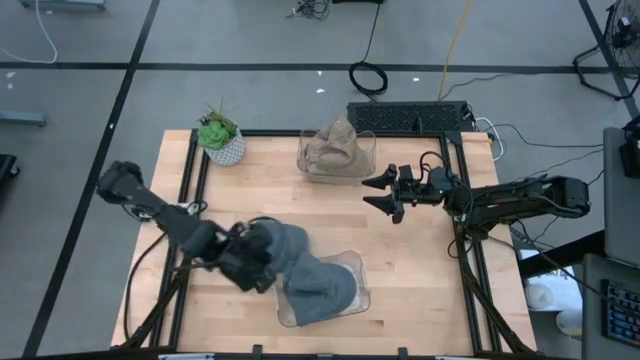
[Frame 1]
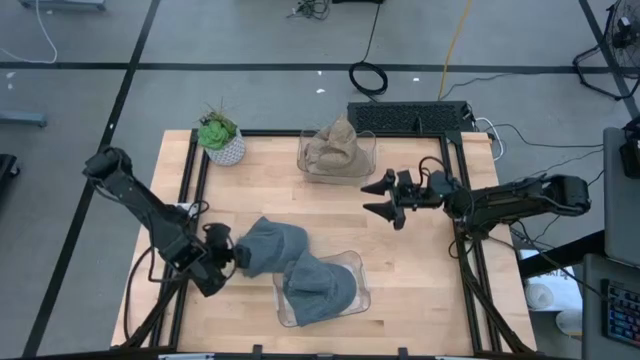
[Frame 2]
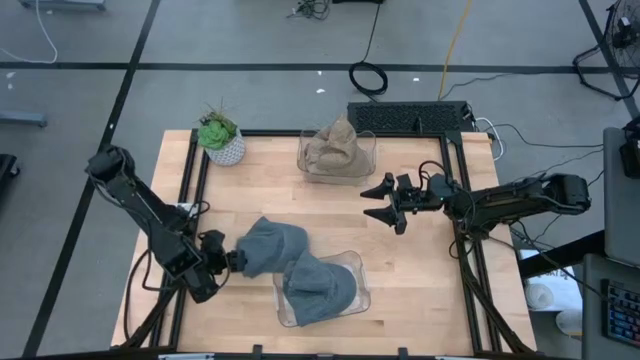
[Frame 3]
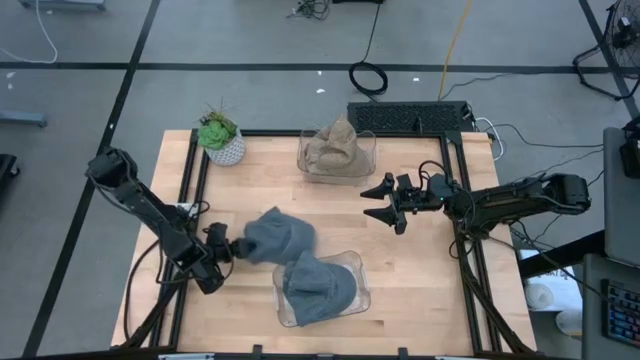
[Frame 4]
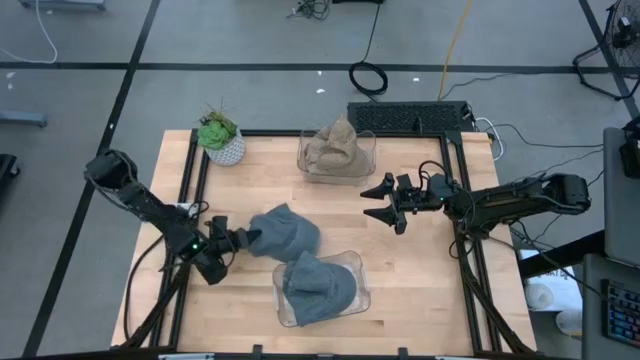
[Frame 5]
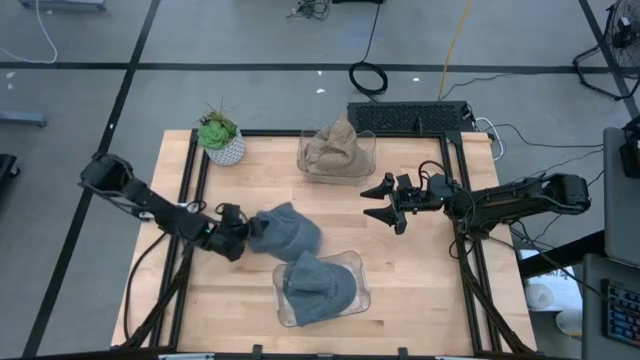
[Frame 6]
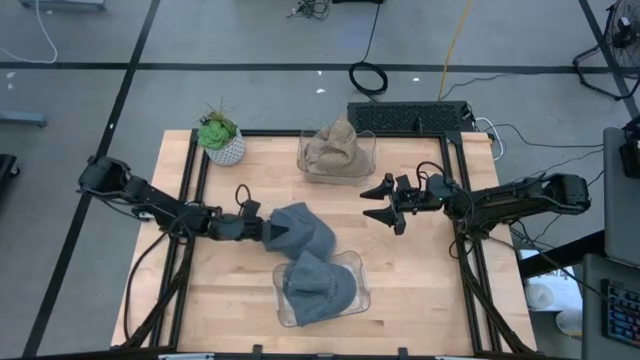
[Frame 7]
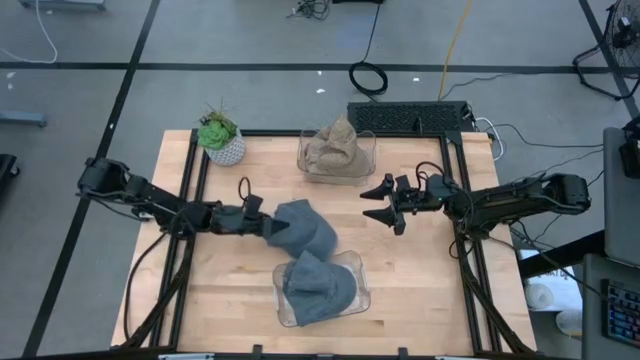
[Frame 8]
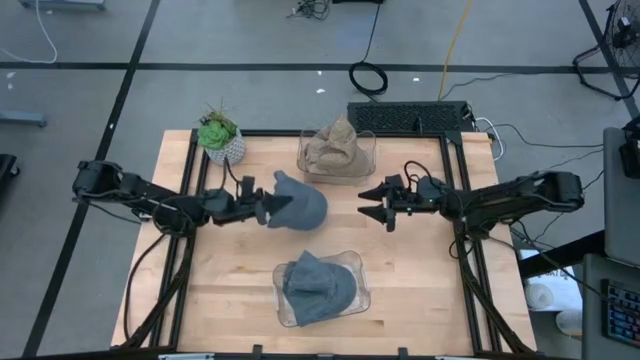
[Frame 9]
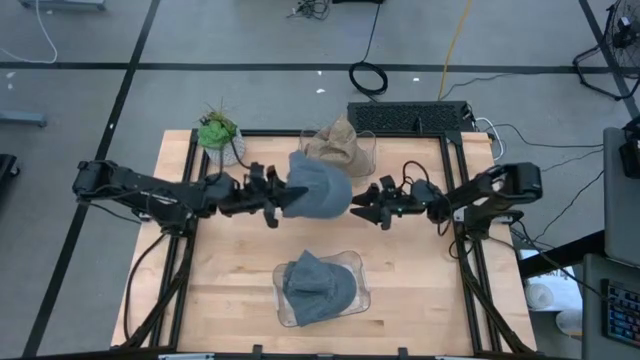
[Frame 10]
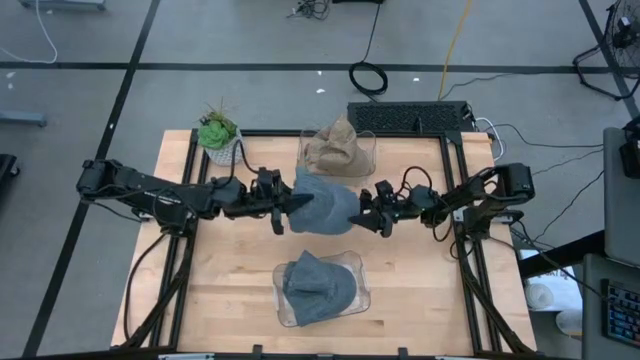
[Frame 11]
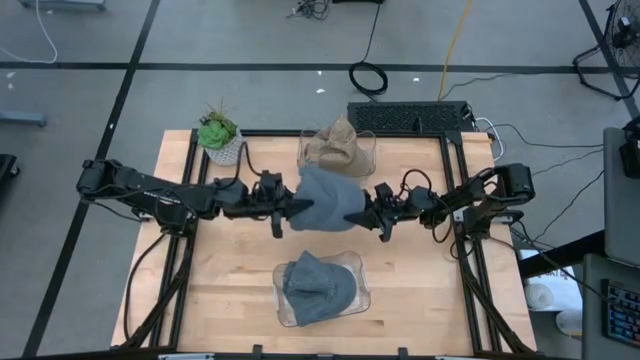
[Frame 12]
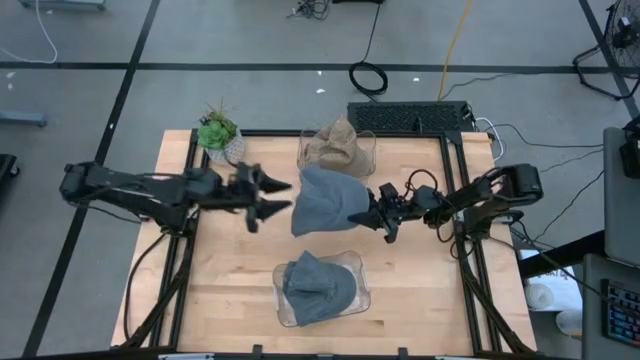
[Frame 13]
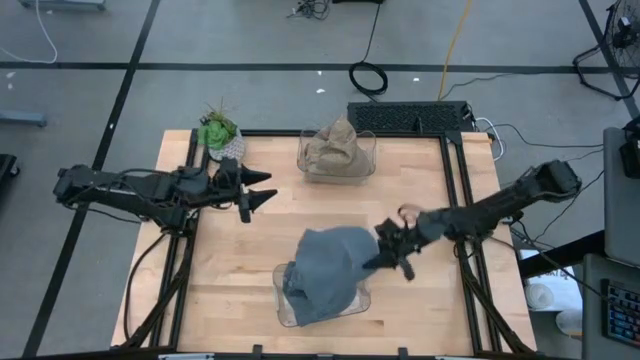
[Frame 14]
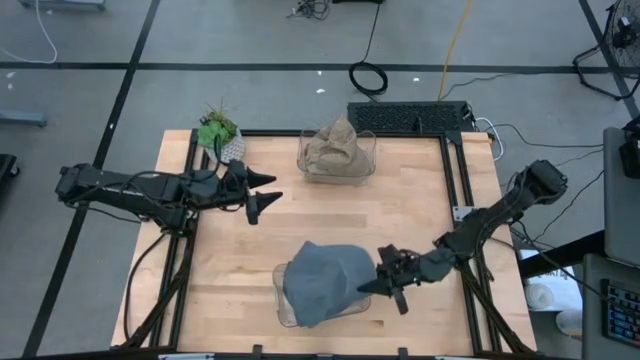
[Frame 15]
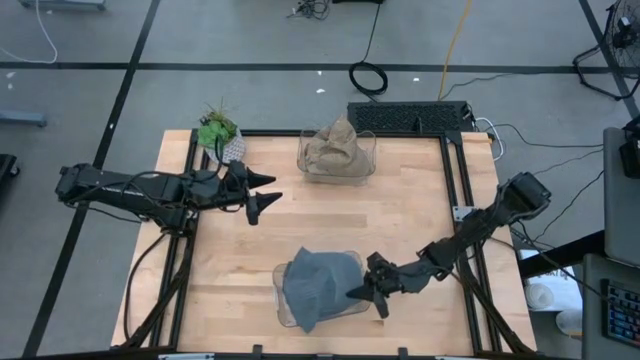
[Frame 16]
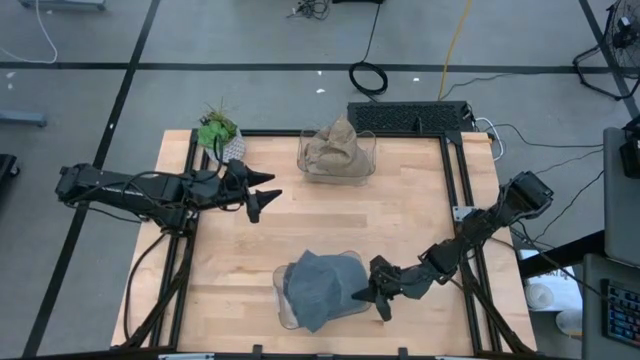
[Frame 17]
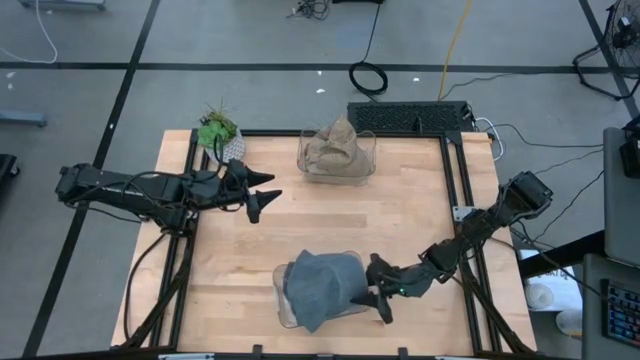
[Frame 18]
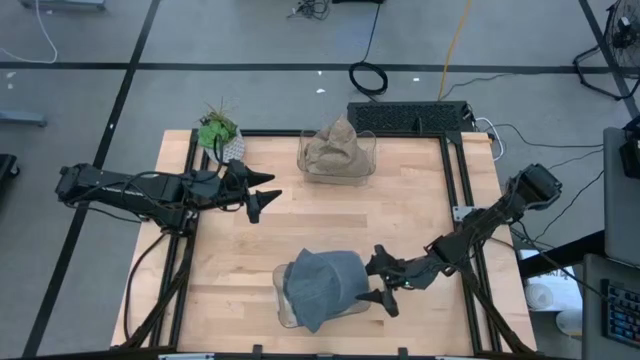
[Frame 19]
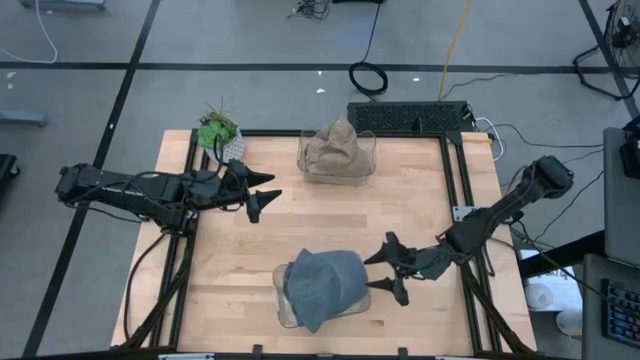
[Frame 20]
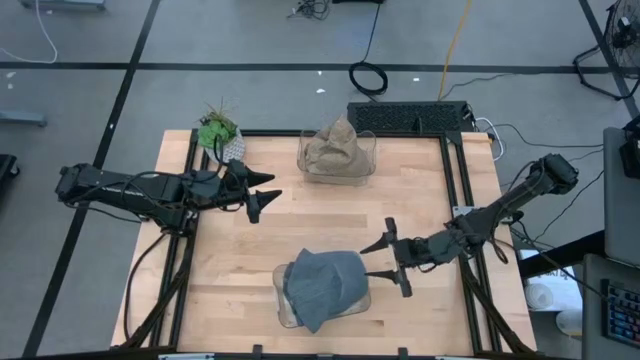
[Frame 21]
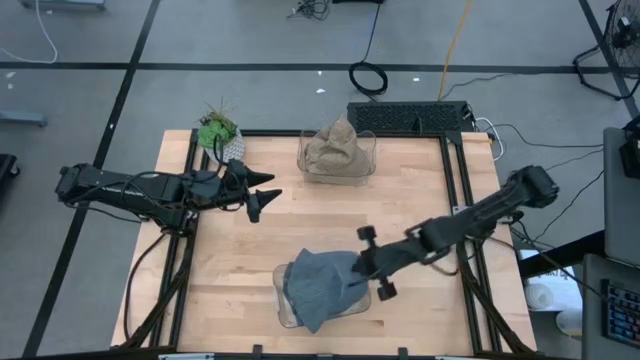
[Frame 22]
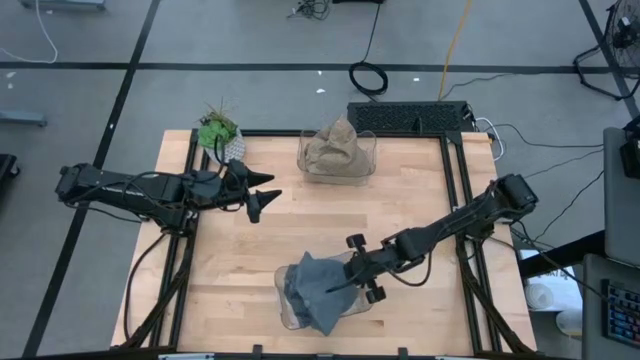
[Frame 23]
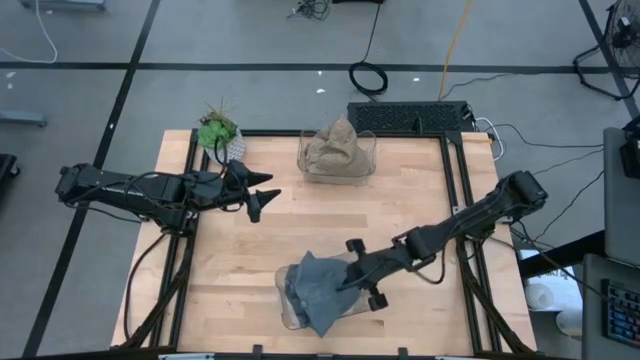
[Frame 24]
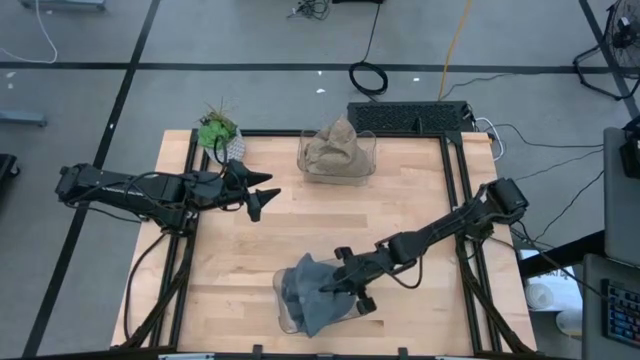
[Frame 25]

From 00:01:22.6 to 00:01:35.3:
Task: Pick & Place hat
Put the blue cap into the bottom transparent bin

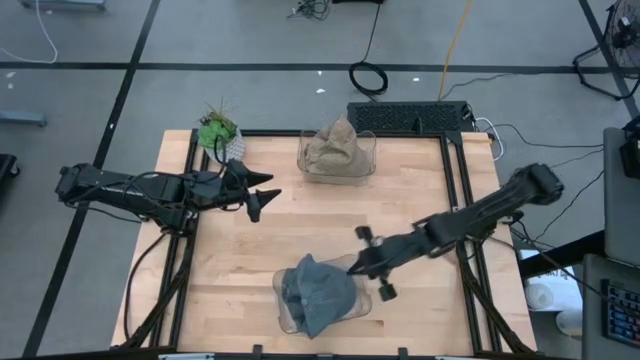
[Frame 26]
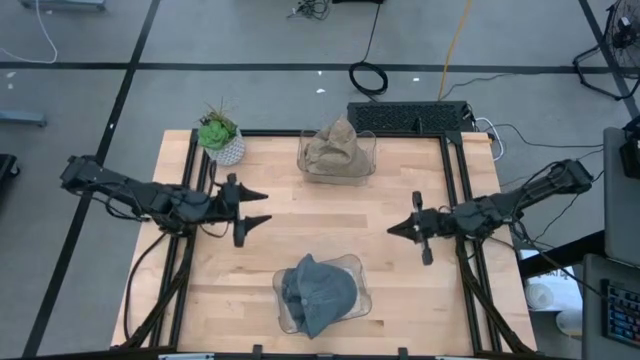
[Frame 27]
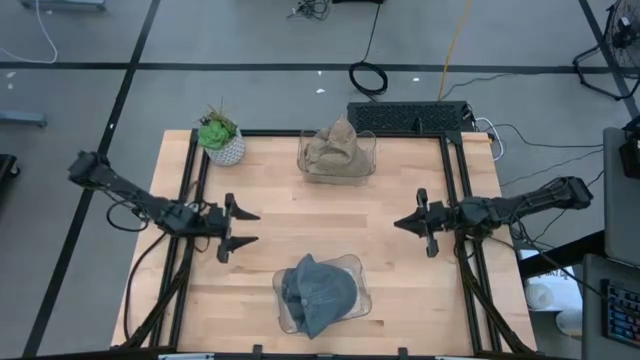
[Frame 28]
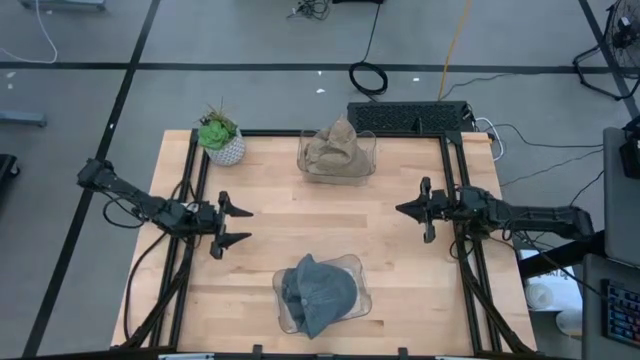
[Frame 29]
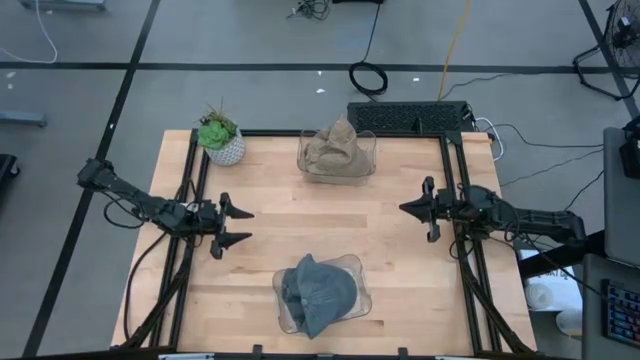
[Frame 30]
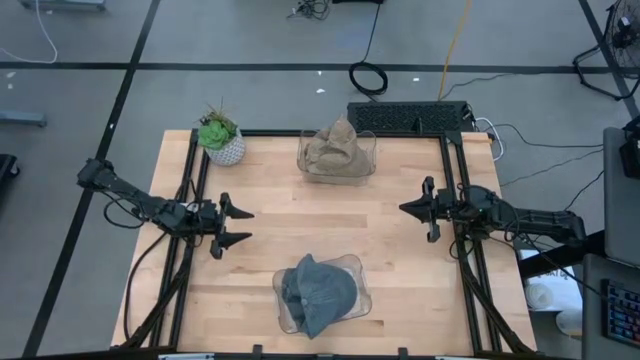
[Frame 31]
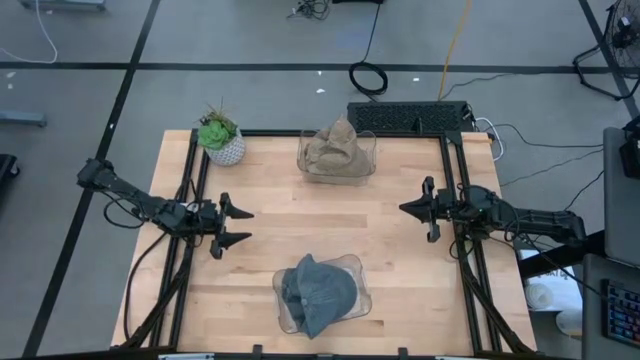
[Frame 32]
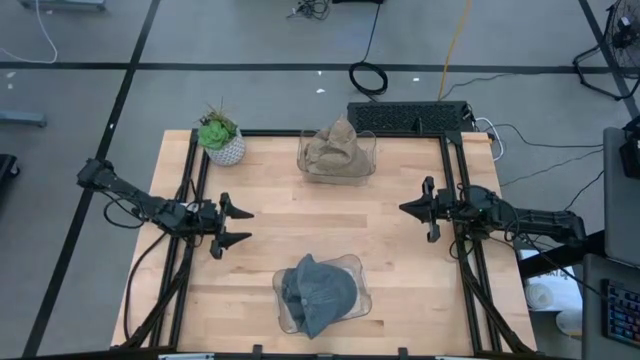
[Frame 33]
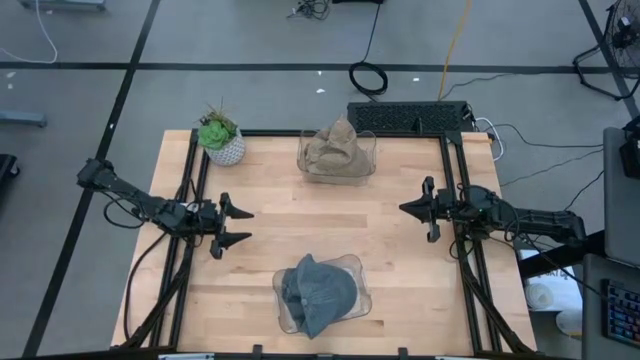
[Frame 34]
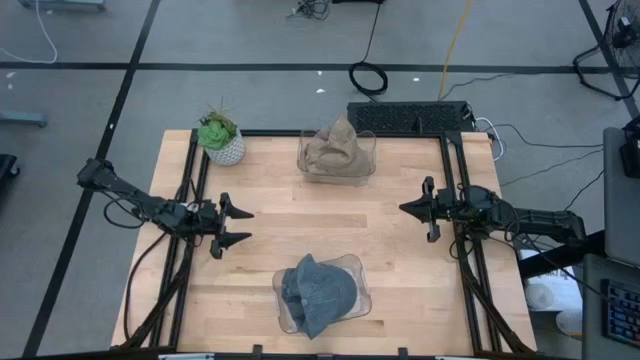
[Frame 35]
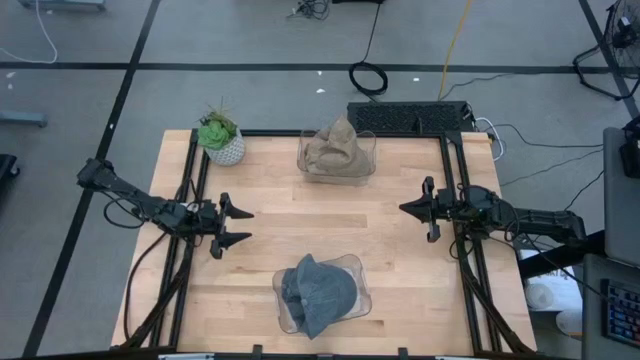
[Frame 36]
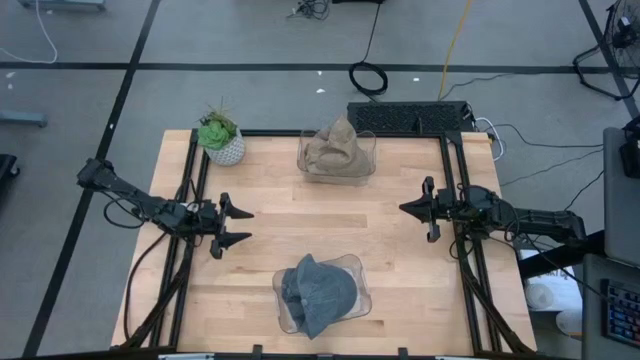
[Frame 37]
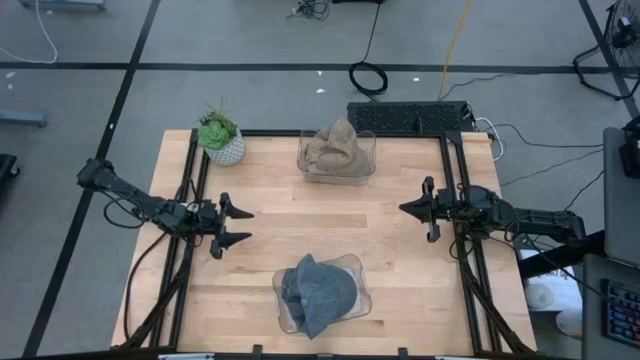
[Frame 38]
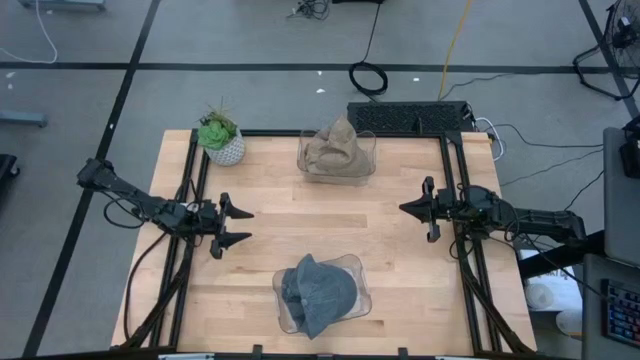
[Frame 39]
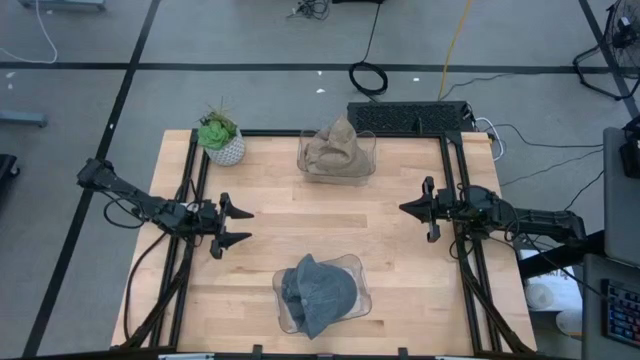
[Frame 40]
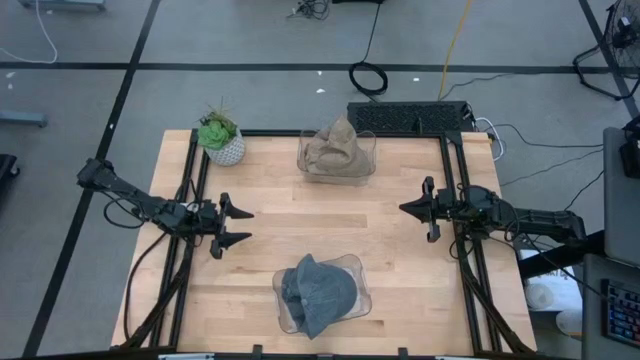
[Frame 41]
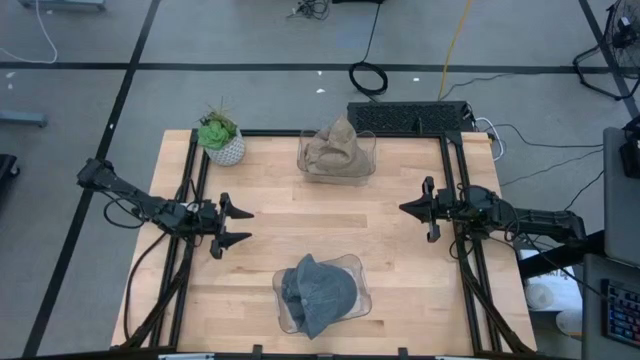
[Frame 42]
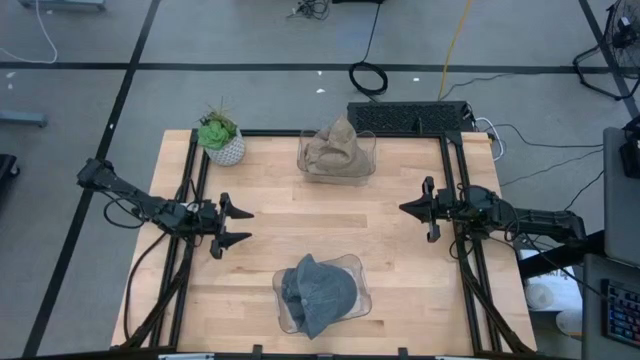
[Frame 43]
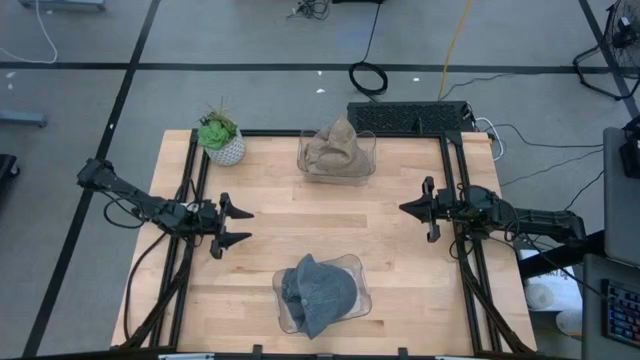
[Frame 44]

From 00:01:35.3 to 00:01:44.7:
Return to Home Position
